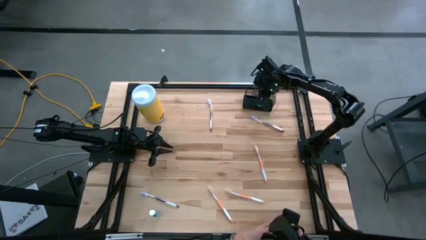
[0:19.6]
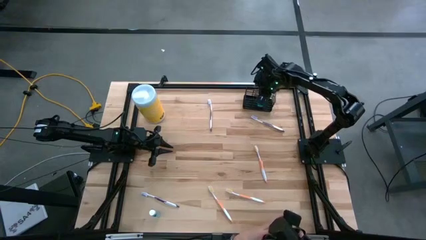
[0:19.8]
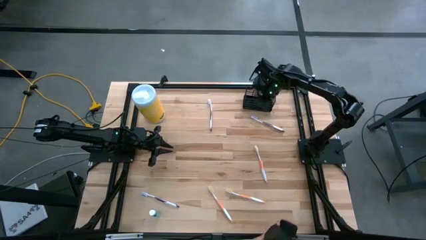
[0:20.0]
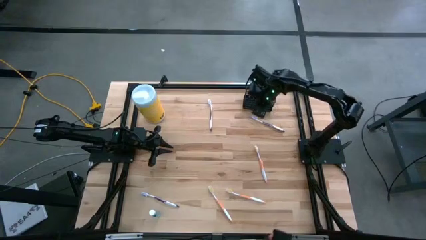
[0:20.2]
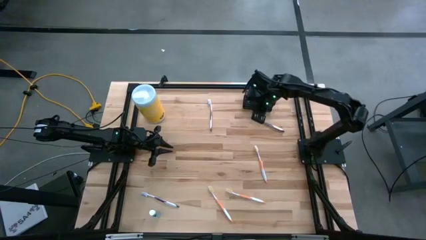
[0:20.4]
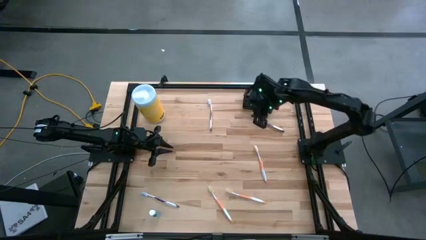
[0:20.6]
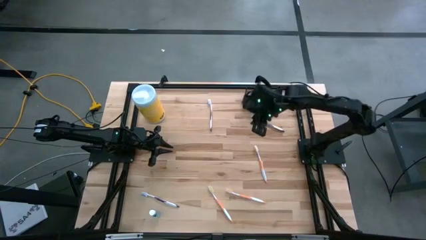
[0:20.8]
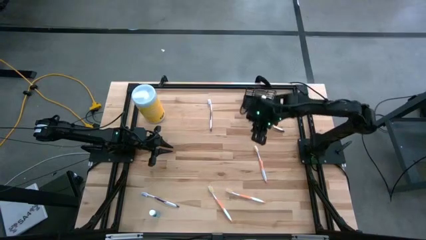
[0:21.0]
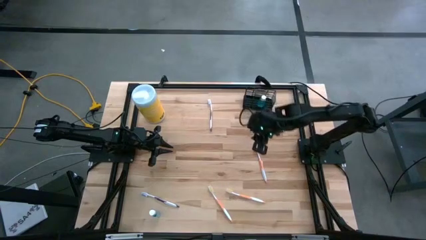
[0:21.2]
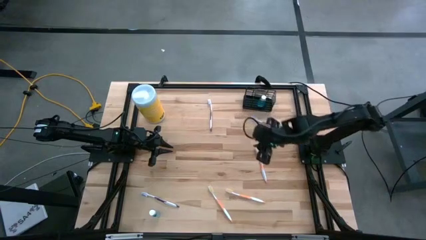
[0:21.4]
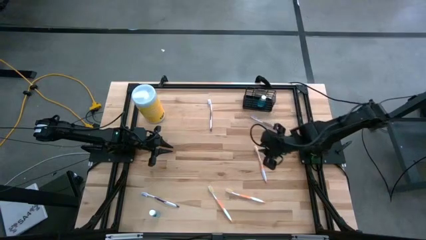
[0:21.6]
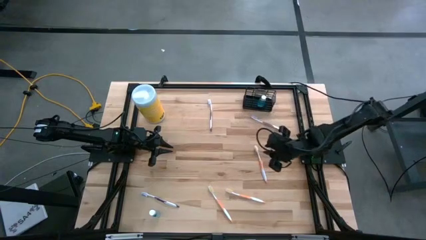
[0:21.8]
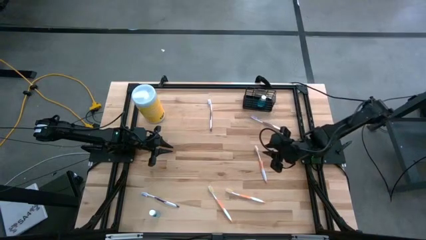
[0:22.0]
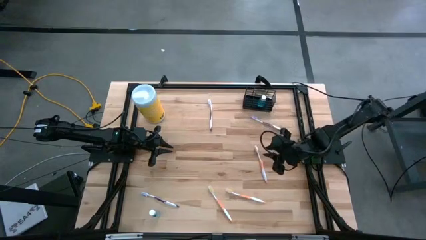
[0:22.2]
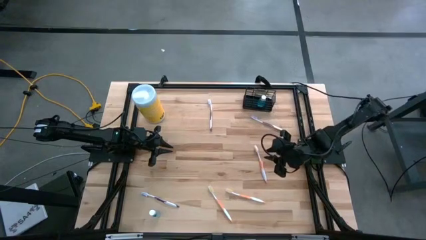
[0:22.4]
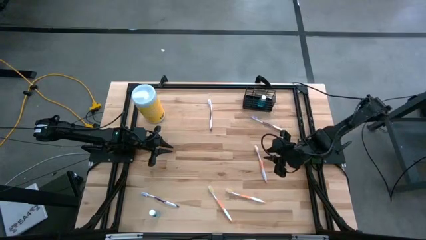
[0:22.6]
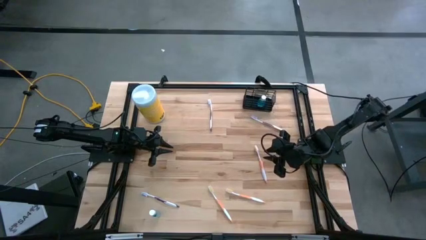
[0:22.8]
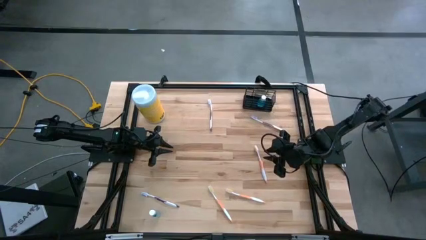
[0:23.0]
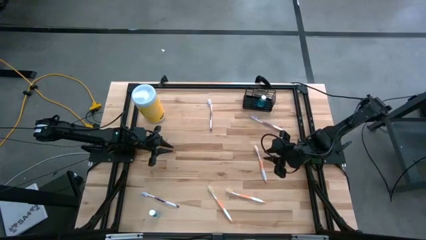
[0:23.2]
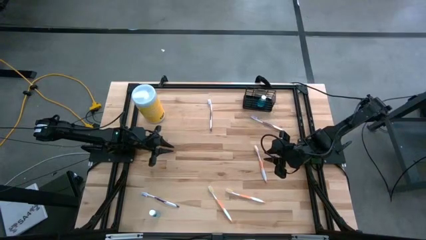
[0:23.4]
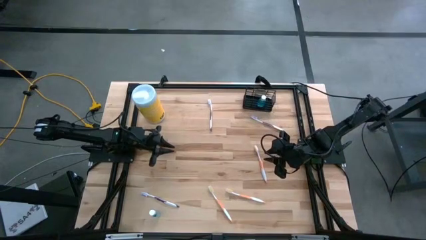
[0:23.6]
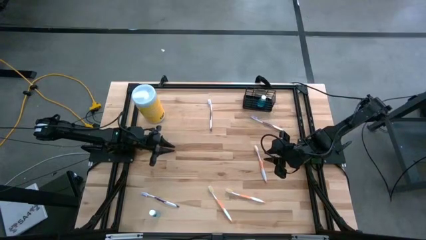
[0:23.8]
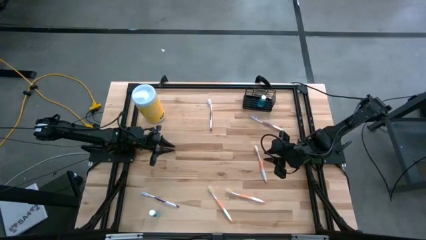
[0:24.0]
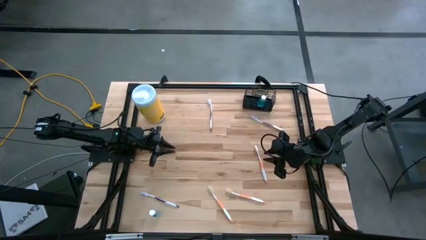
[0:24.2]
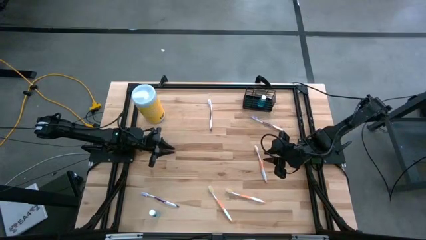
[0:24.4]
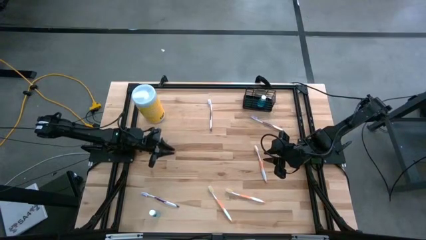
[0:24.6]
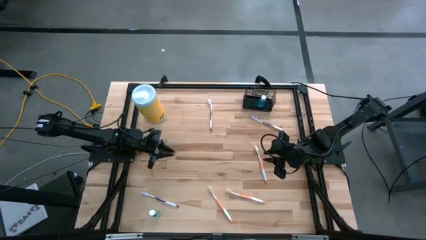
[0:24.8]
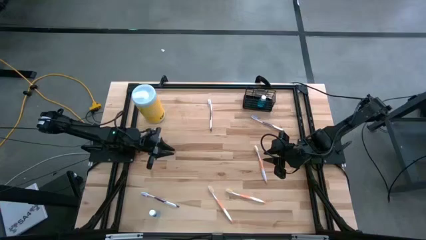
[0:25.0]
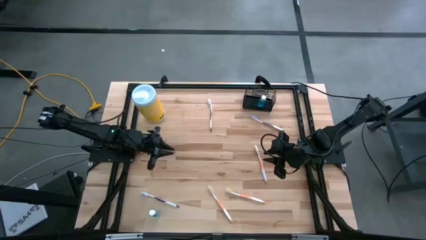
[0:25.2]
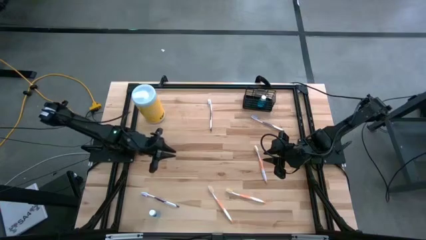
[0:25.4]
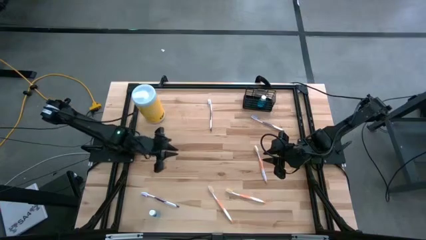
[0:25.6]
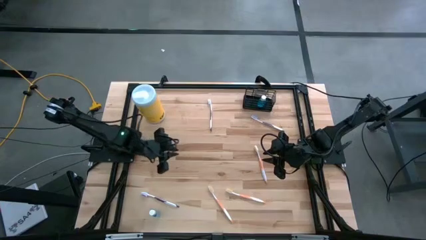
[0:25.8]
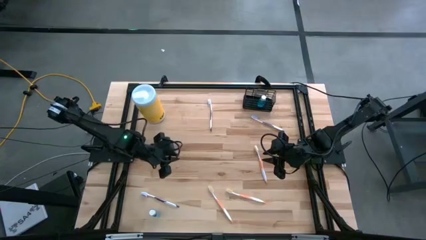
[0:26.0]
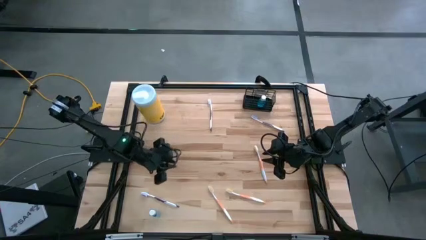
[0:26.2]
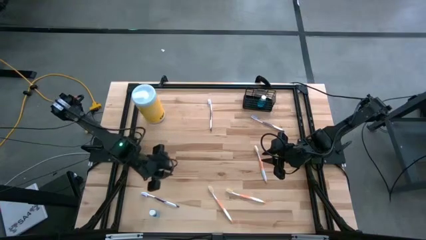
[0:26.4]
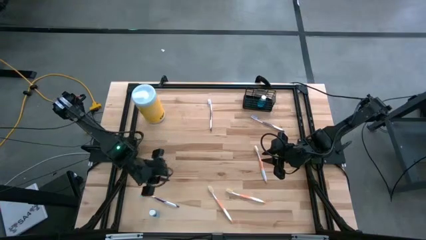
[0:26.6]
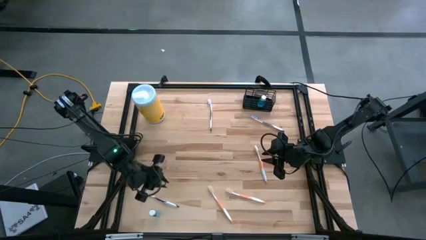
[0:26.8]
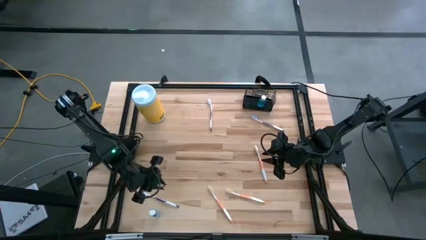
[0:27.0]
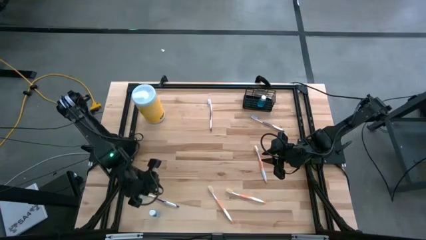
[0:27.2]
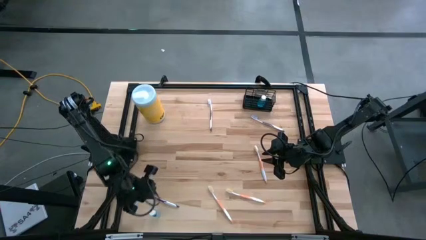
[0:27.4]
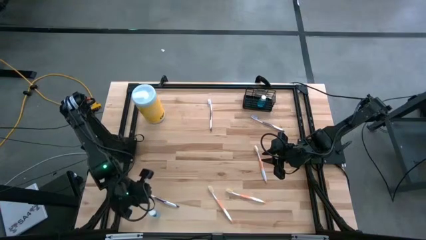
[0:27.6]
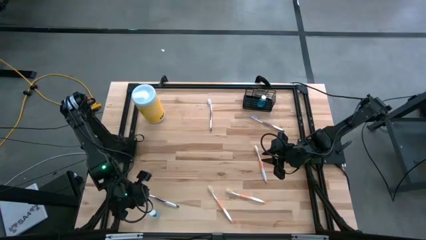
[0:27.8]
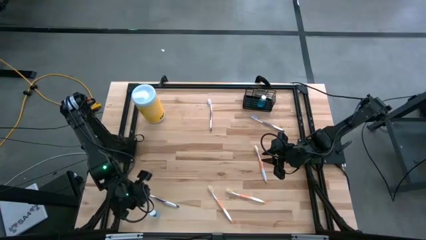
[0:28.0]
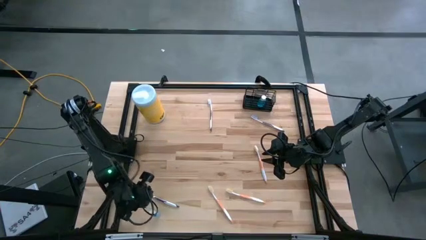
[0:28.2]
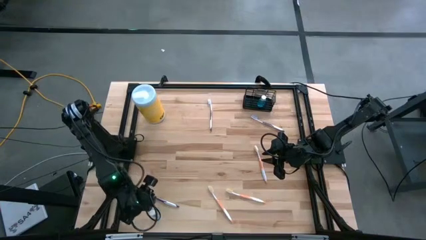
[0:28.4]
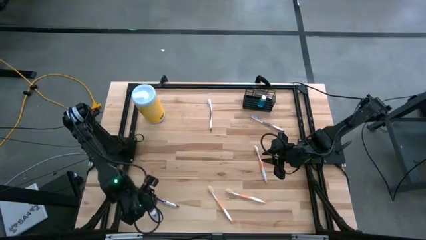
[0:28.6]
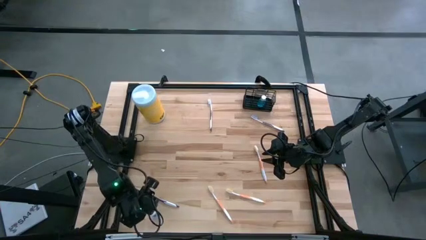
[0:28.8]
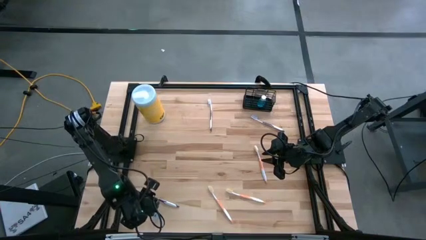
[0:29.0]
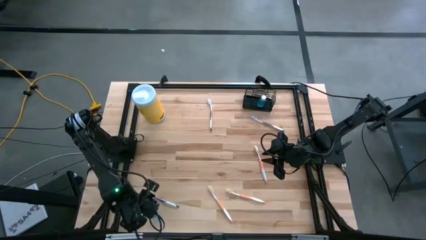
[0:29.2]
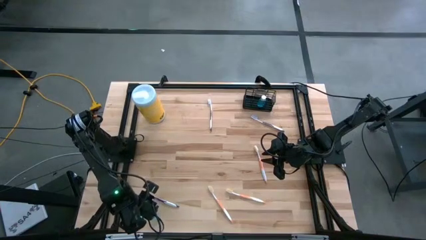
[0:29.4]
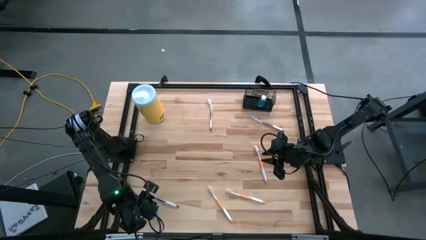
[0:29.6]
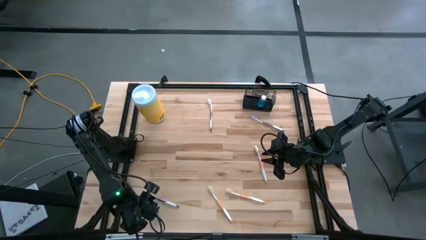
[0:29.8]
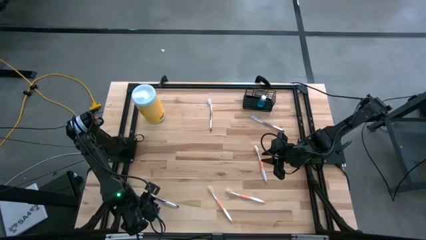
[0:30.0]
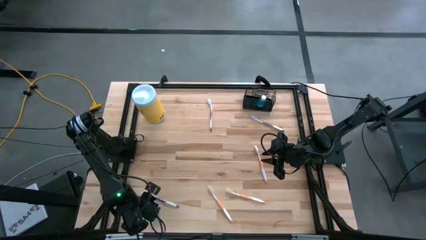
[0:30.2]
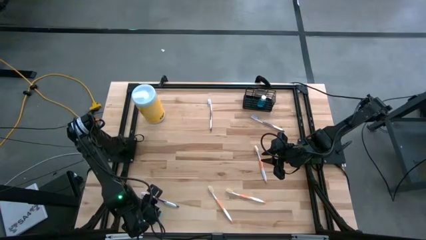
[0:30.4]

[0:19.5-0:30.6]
Task: Pick & Place toothbrushing station
Put the blue mouthwash into the black wire organizer
